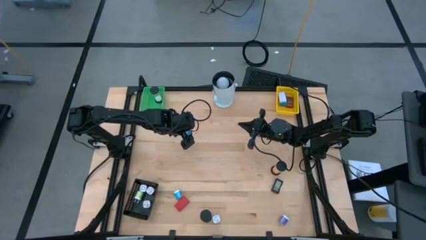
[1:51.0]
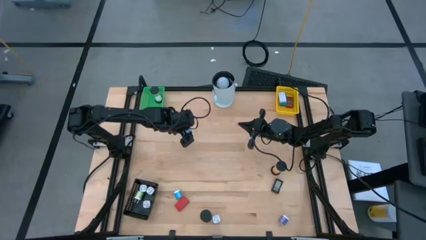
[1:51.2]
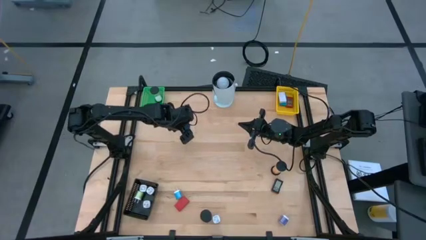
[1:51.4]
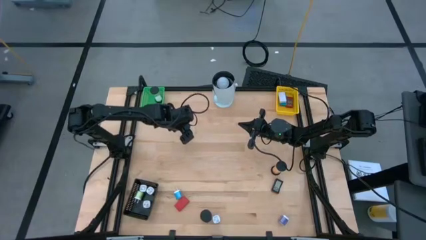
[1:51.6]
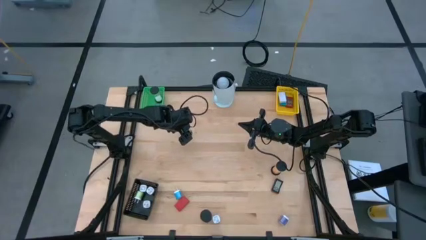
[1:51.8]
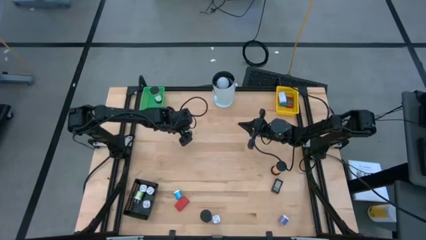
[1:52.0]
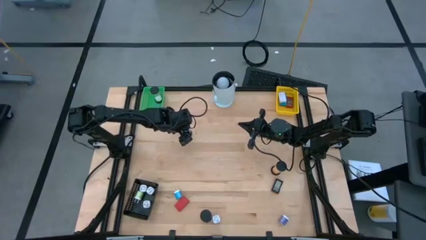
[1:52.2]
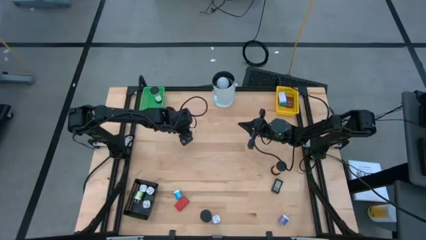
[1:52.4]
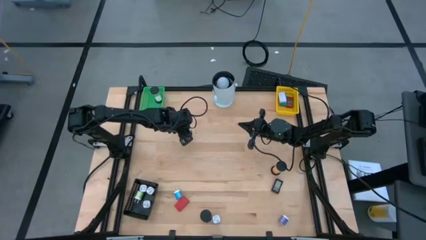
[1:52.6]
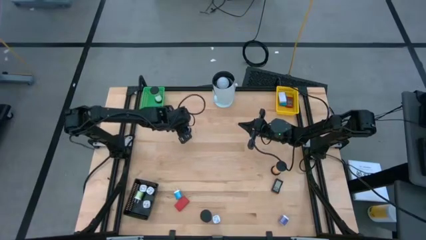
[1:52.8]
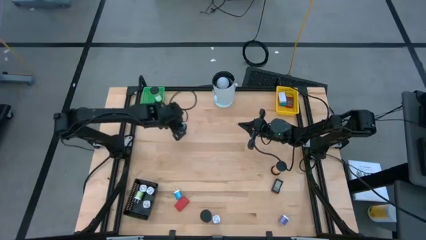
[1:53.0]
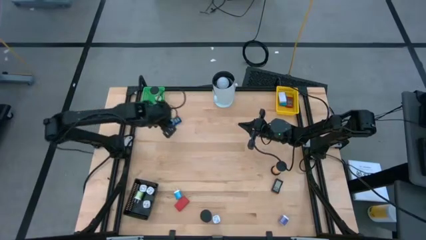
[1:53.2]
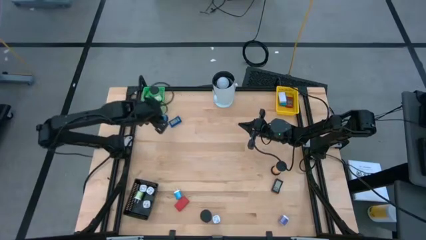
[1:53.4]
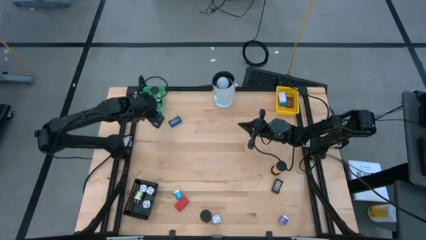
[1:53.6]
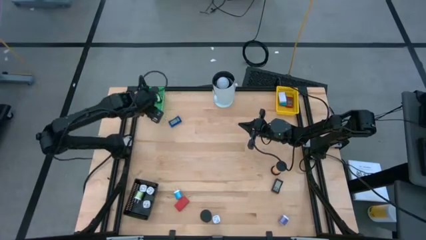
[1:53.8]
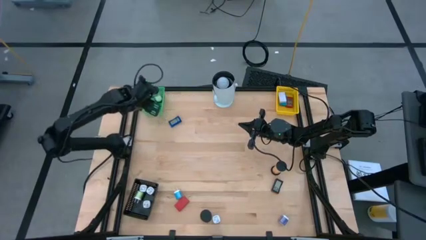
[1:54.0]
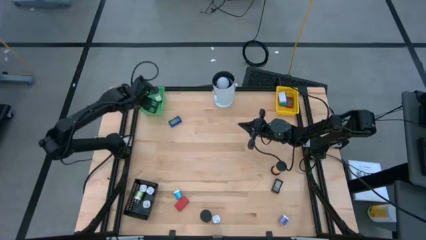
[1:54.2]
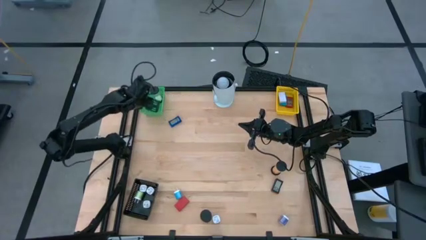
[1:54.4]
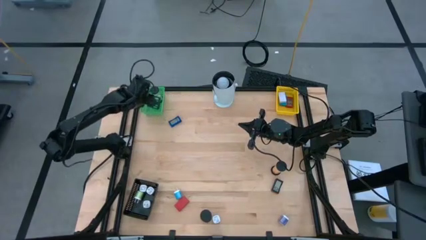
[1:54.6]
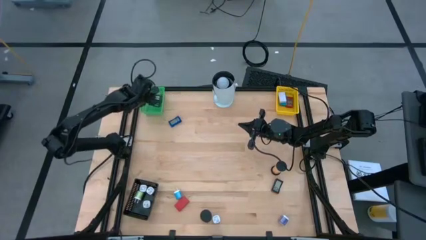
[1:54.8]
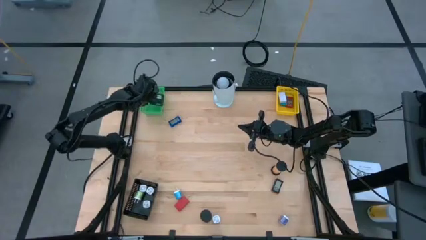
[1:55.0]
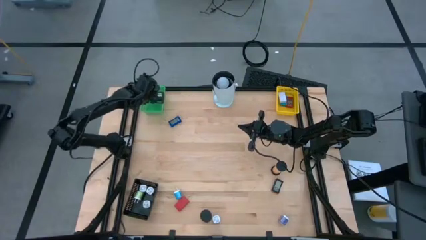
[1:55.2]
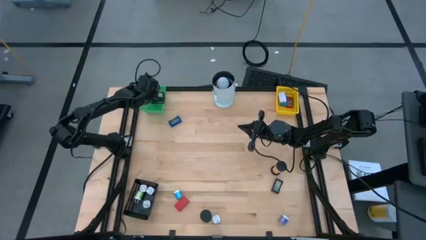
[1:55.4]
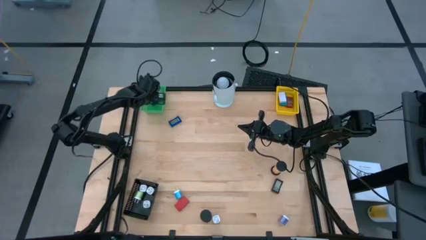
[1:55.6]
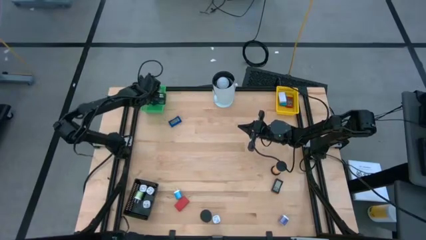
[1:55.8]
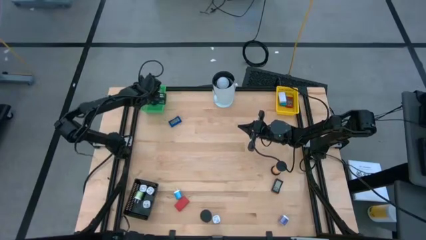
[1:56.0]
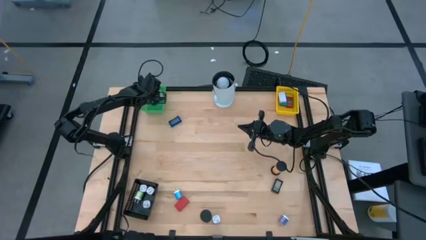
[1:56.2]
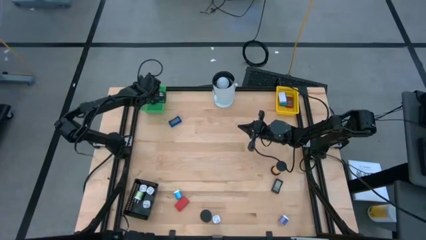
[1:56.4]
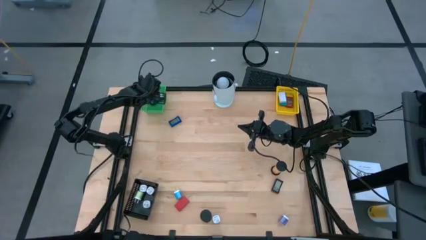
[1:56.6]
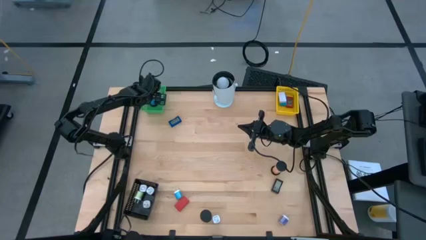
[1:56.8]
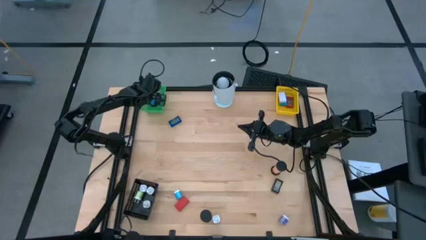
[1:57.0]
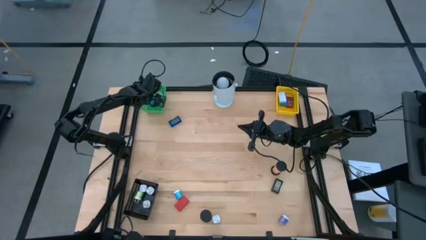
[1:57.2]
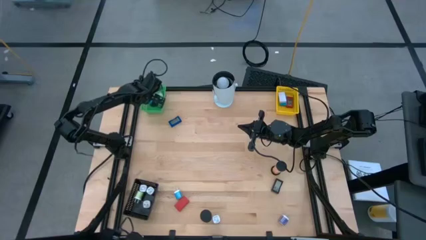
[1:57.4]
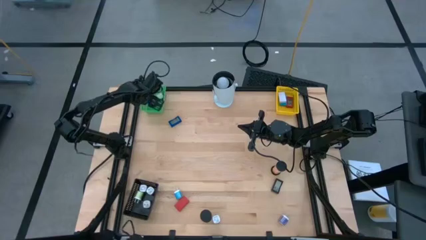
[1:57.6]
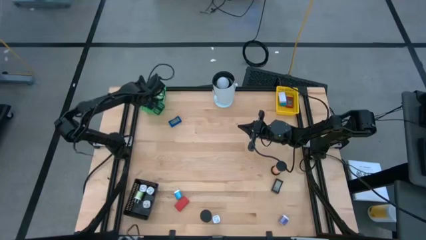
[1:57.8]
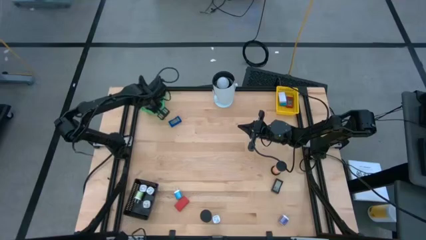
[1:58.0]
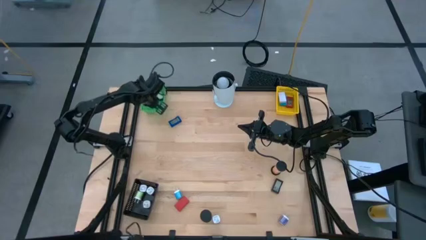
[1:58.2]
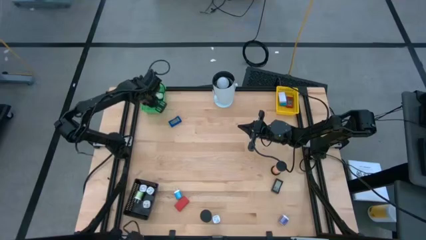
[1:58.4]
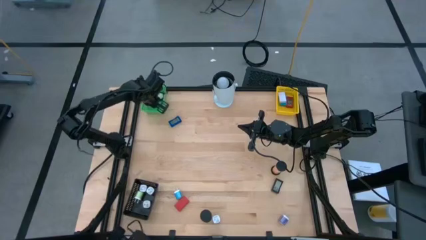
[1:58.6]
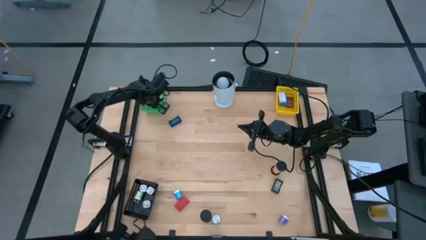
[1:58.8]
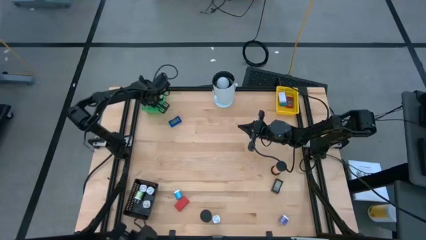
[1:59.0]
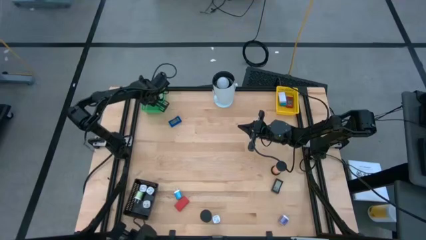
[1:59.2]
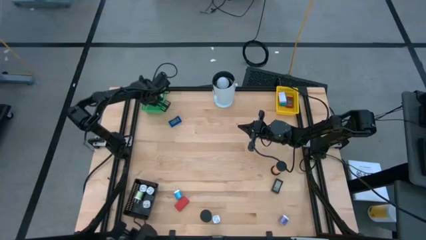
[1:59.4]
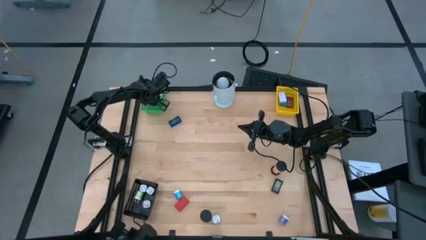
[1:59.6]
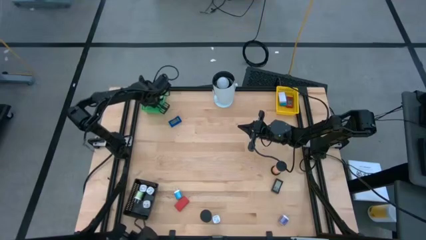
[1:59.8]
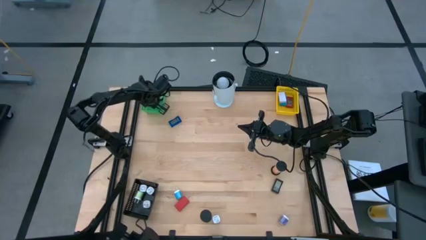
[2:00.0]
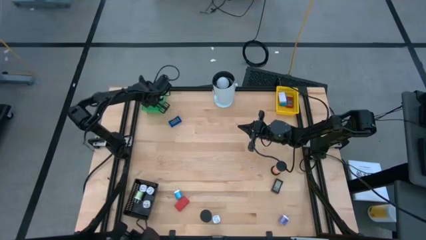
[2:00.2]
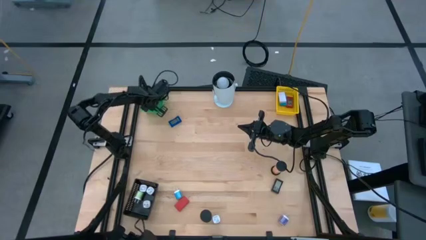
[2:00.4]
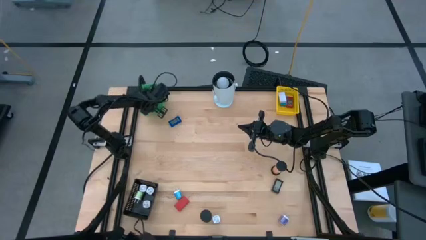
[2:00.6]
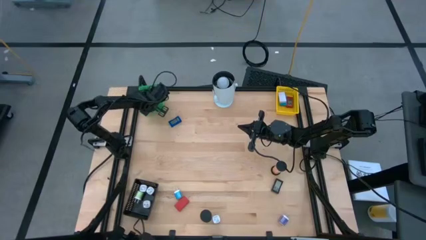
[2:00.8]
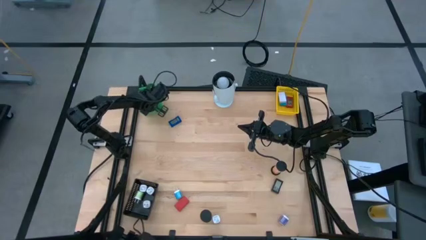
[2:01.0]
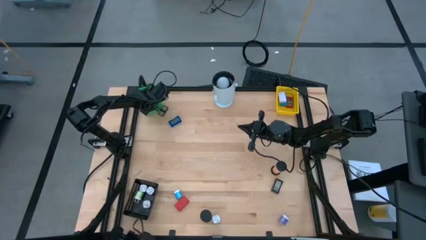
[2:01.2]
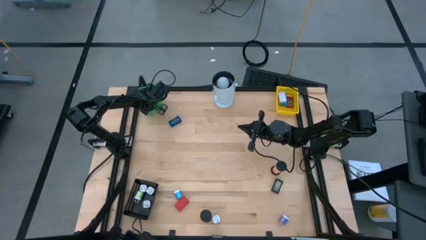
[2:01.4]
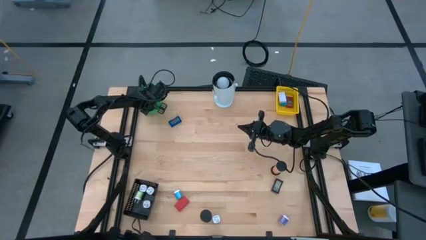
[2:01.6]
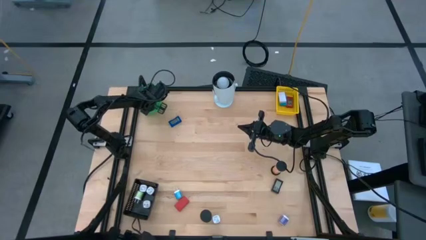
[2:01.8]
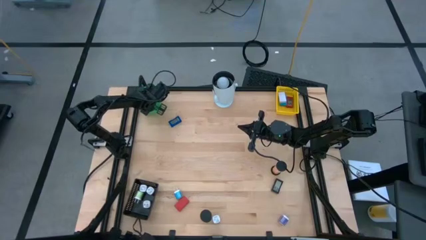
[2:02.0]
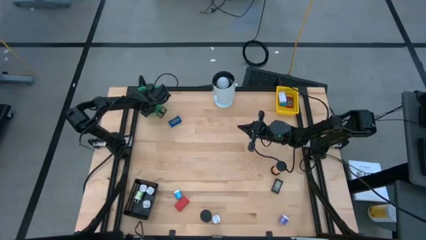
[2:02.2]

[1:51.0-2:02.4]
Task: Pick & Place Office items
Put the blue hourglass timer into the green bin
